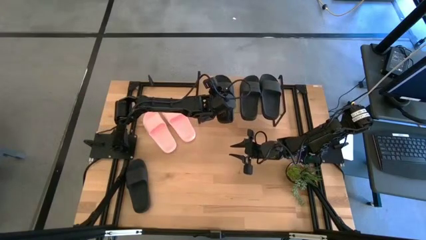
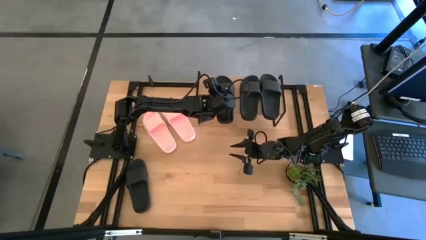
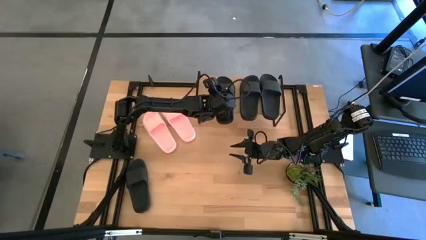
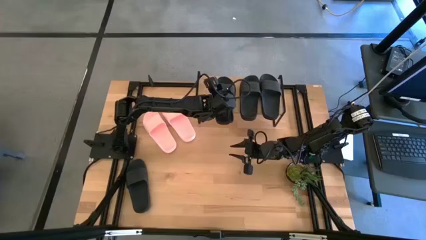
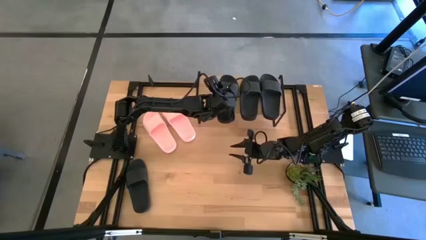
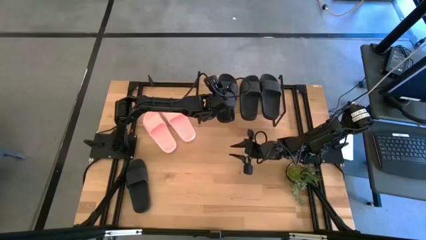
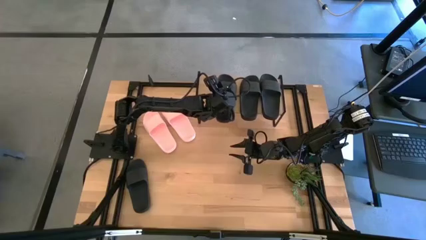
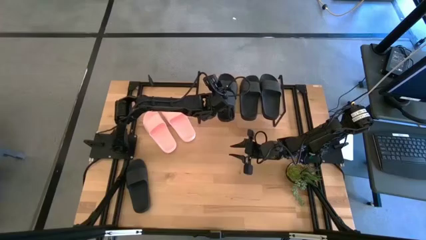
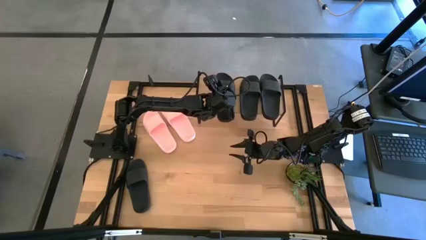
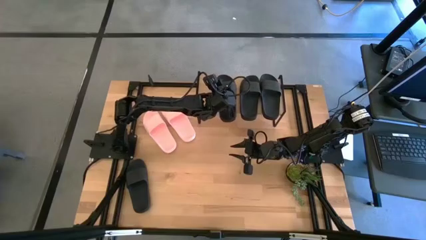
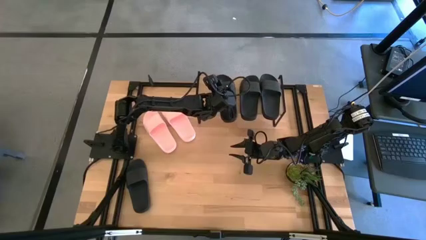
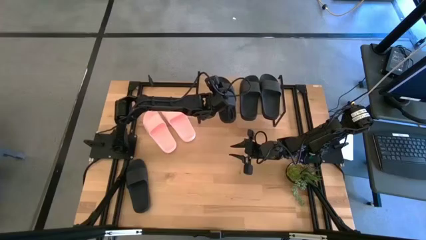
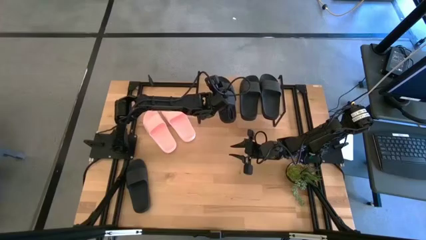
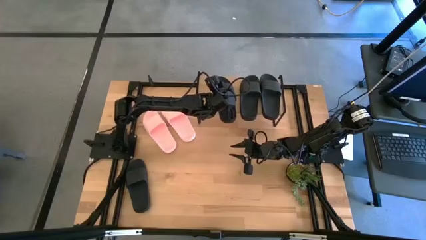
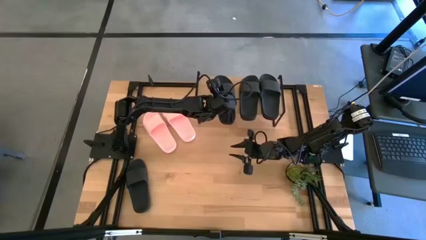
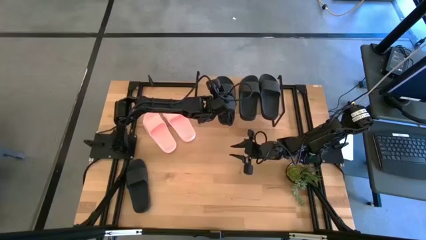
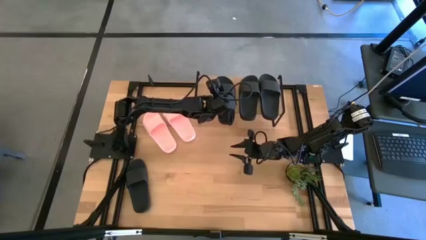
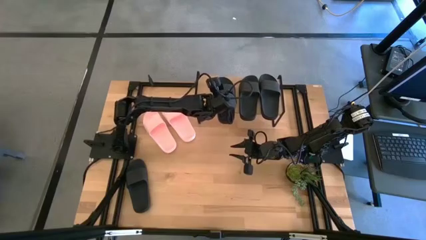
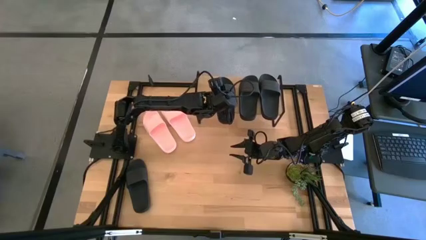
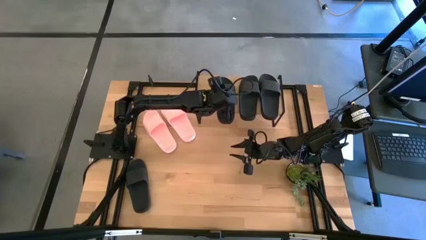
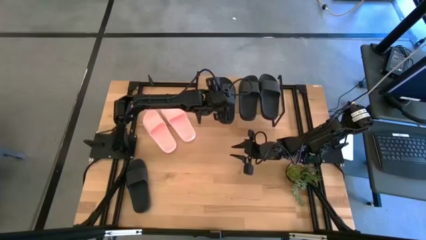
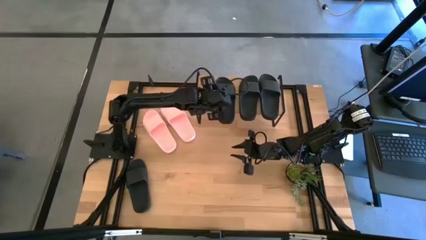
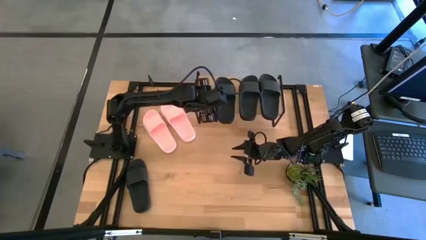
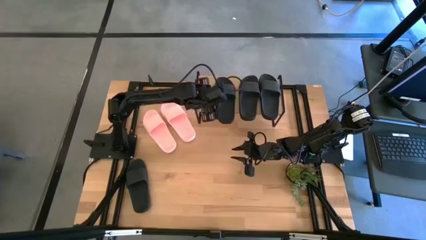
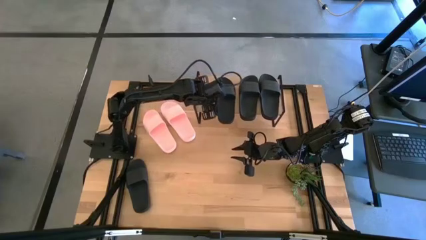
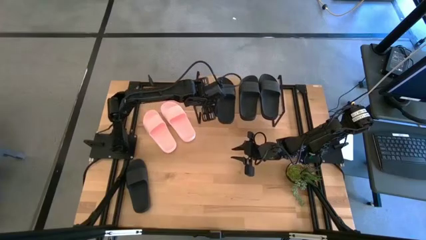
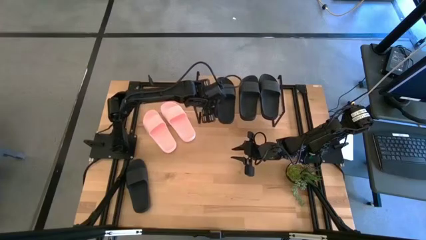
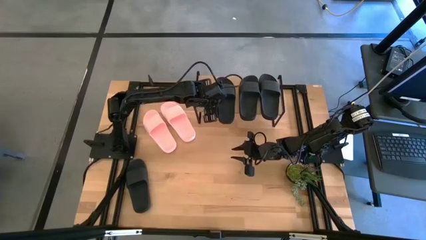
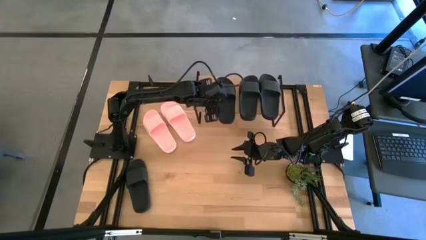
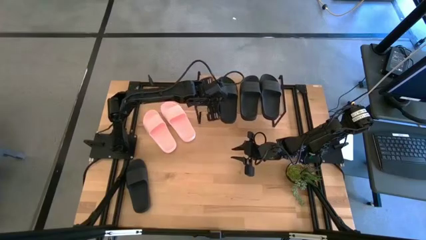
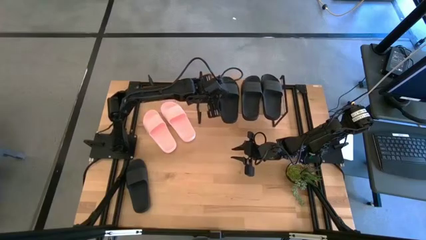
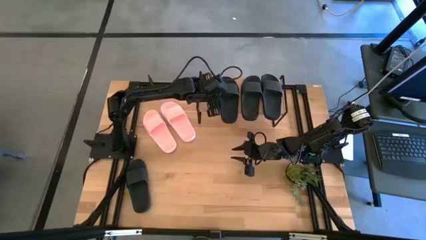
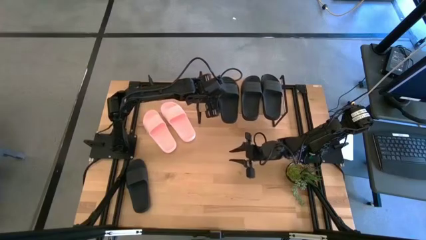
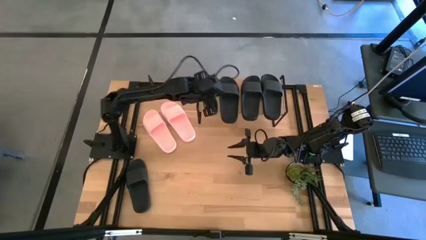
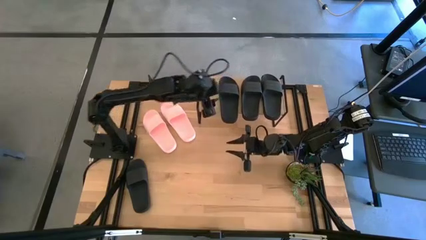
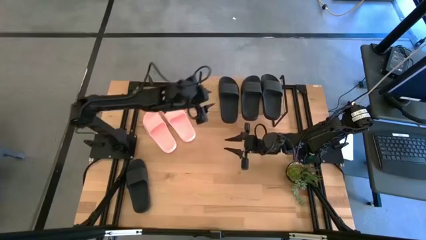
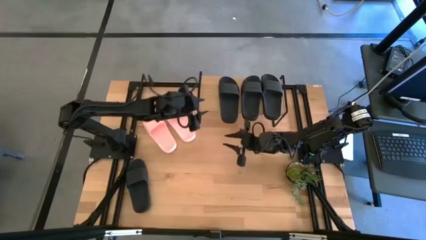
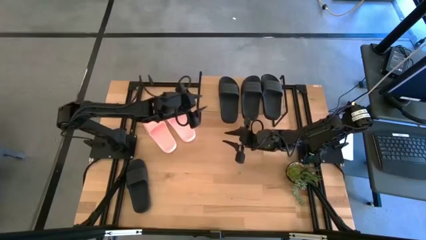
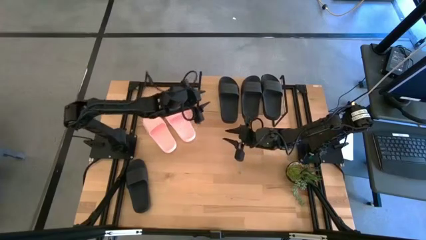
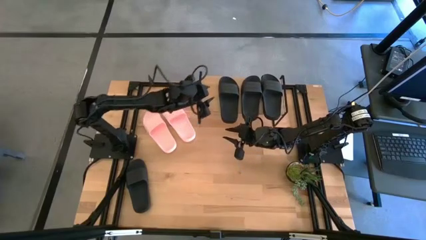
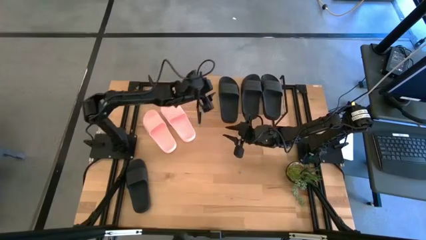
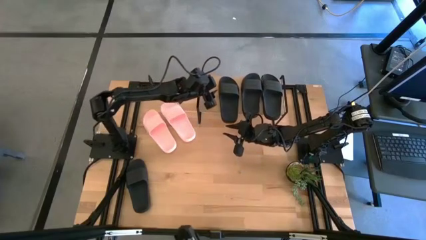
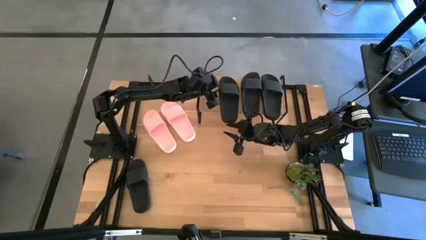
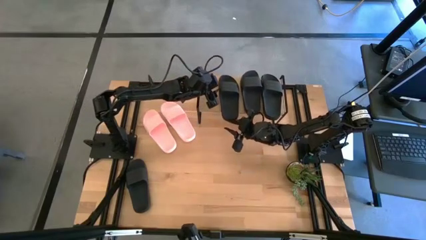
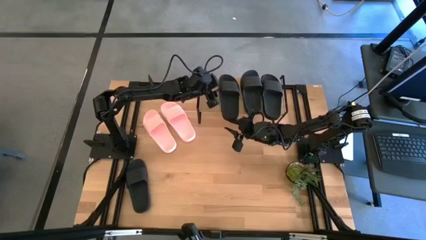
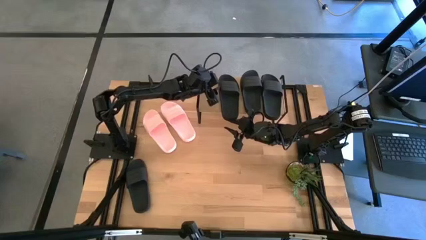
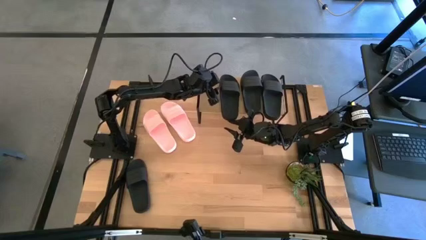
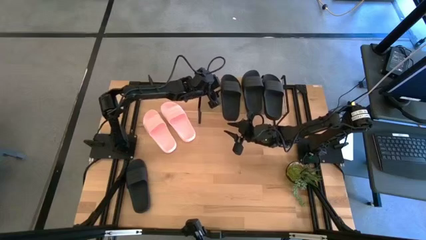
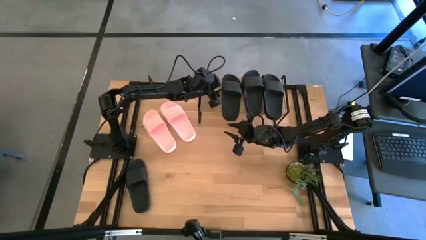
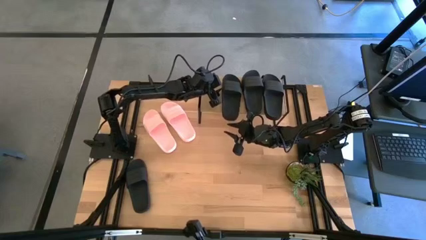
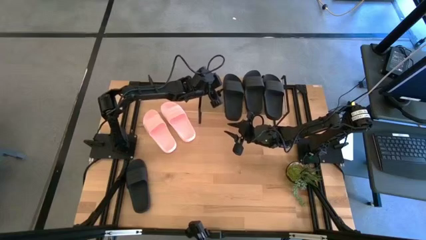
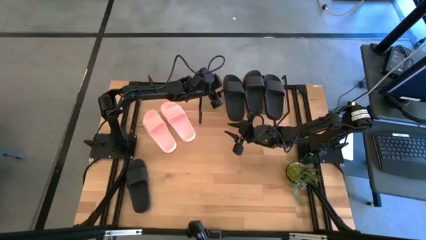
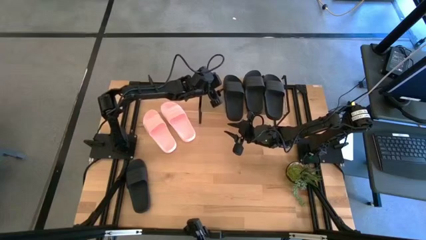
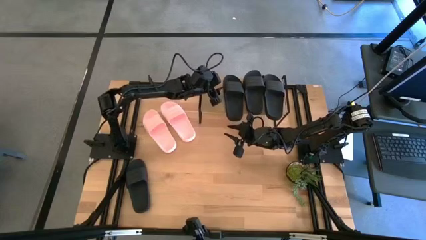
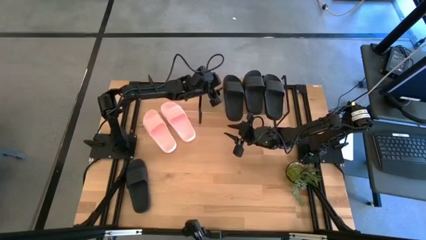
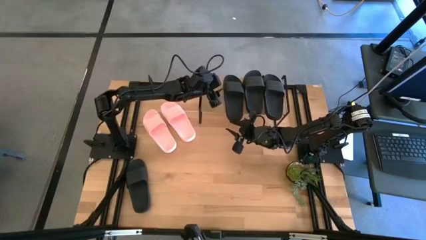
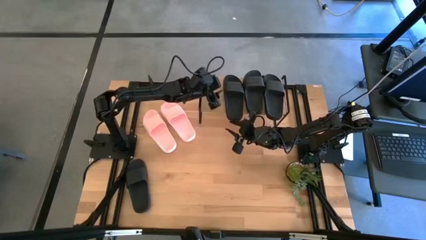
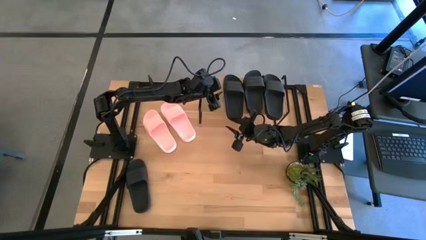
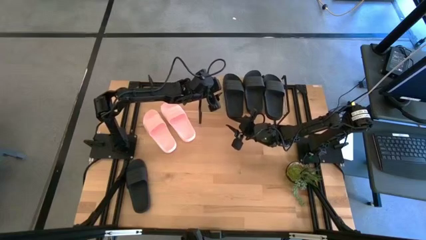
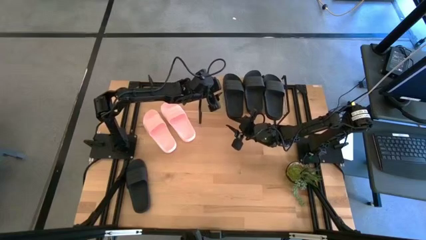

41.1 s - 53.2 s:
Task: Pick and place slides into the shelf
Put the black slide on the shelf

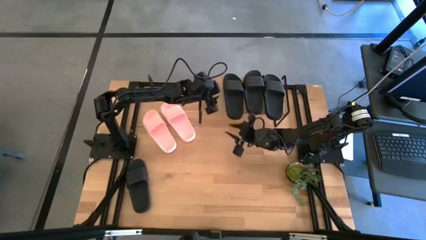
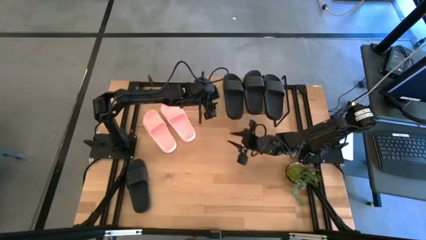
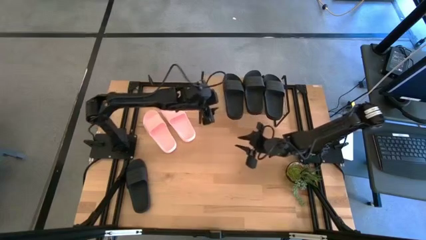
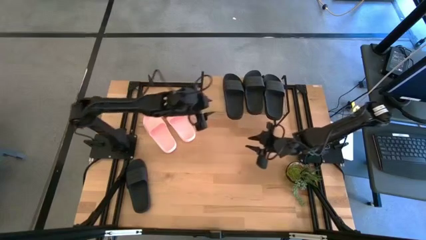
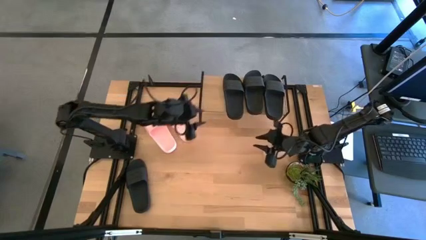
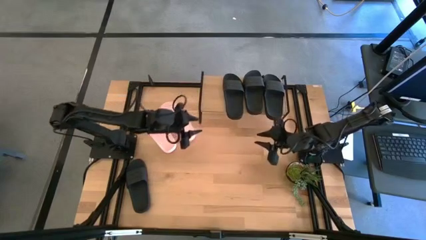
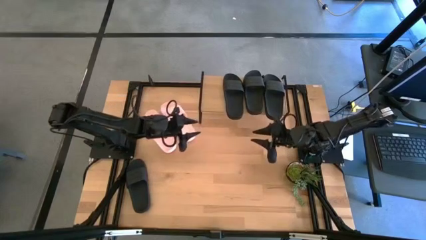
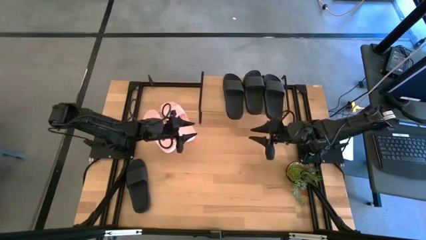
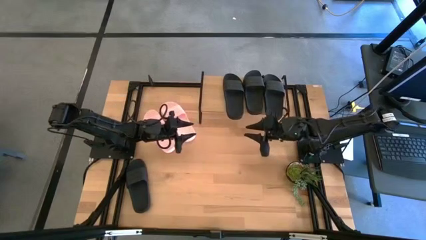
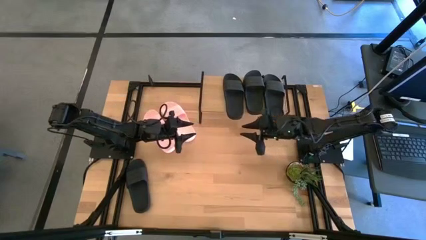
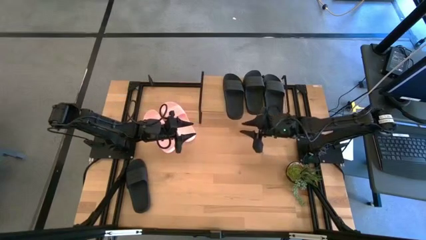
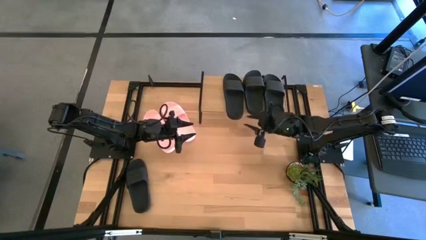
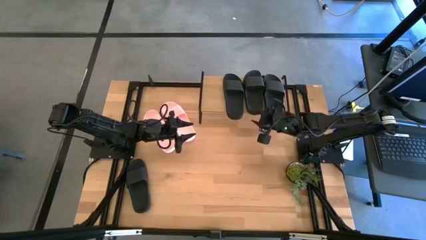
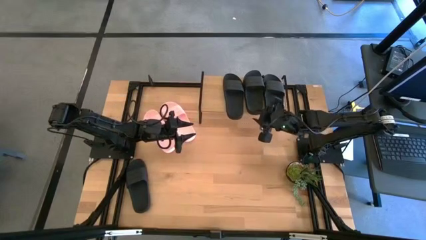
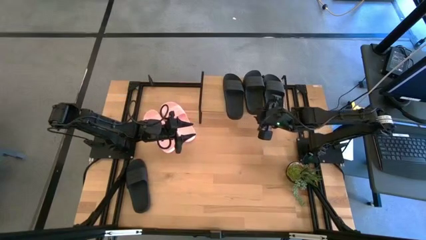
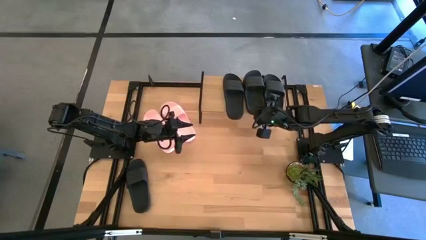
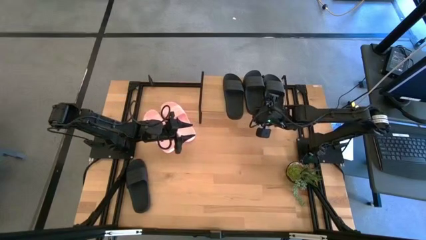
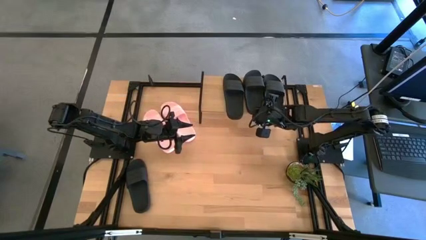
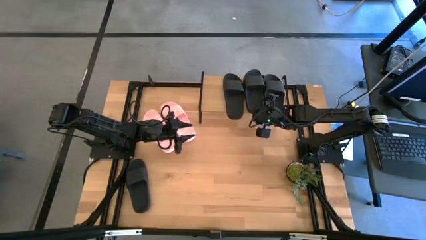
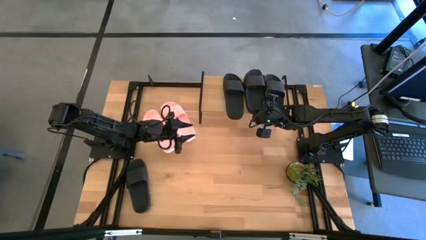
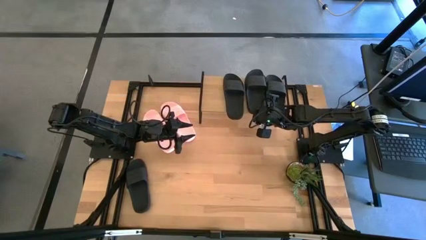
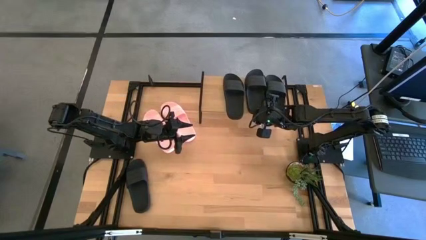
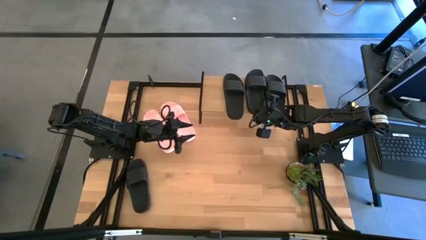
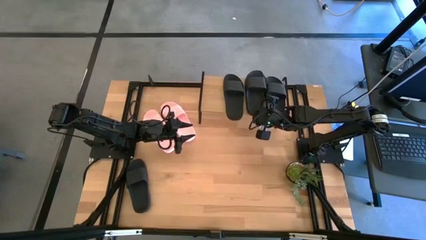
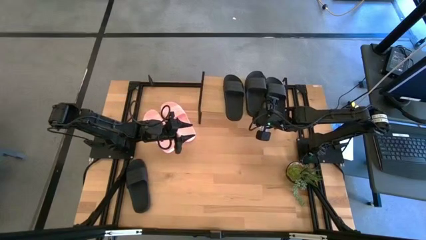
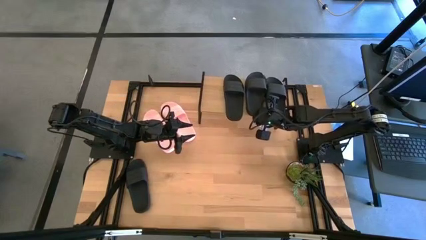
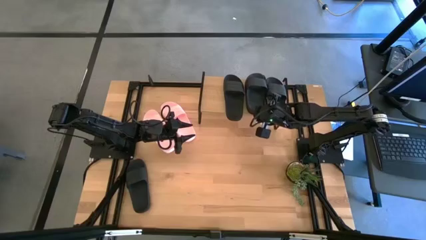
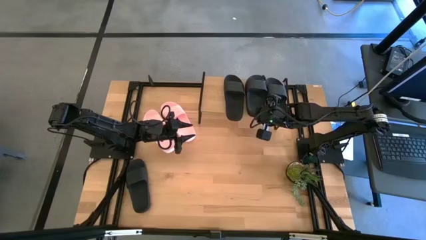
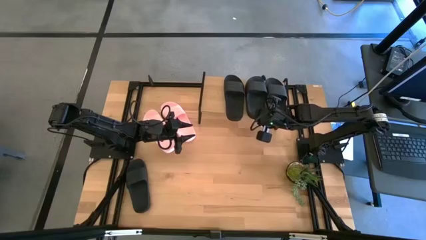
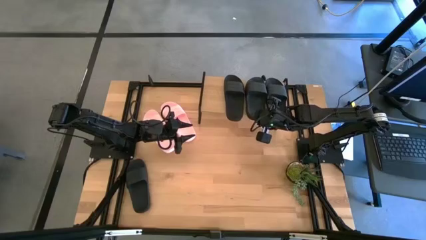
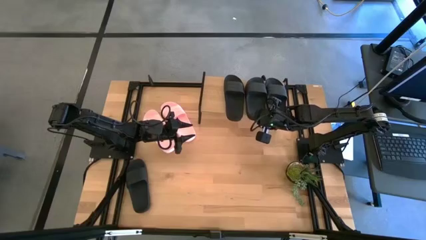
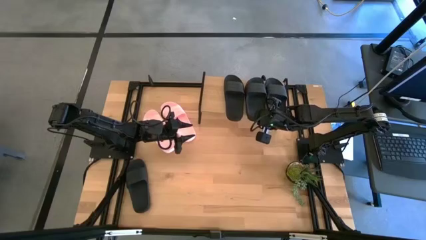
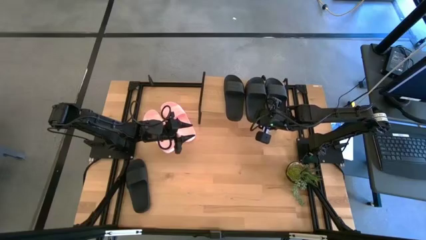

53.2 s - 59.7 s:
Adjust the center black slide on the shelf
